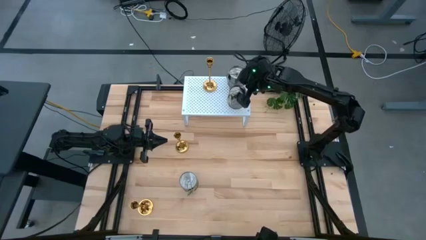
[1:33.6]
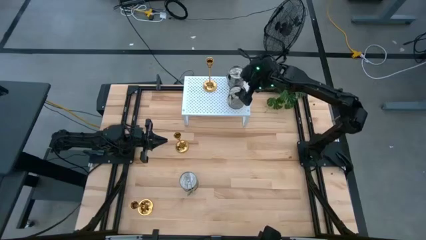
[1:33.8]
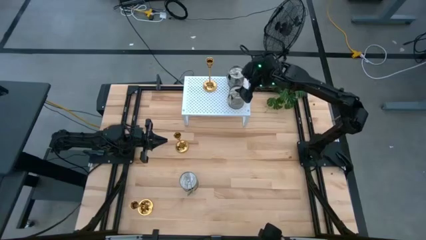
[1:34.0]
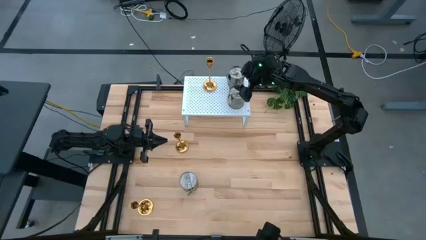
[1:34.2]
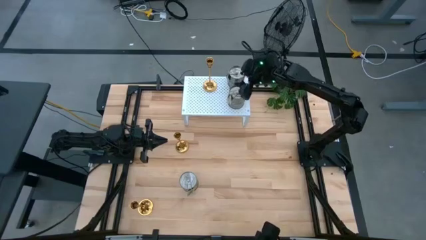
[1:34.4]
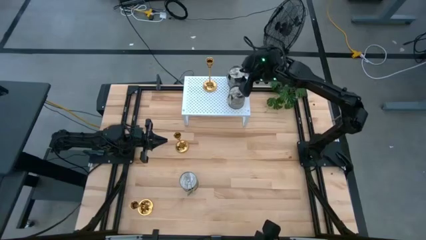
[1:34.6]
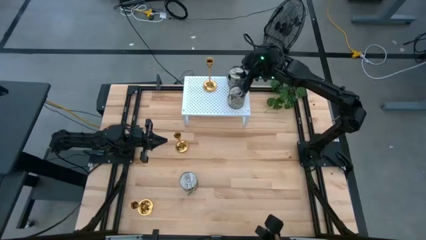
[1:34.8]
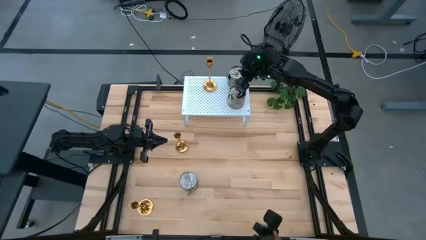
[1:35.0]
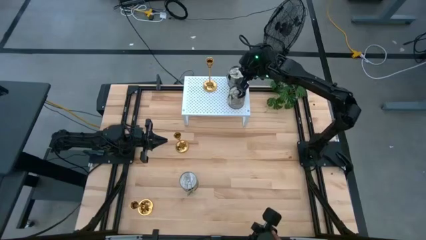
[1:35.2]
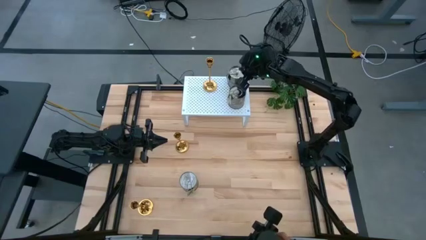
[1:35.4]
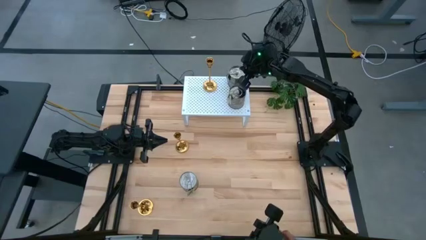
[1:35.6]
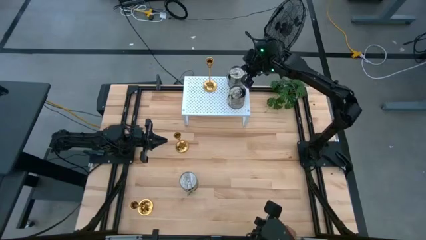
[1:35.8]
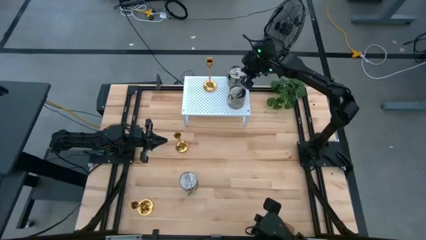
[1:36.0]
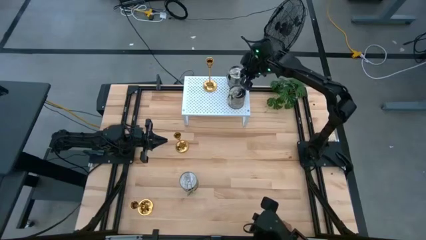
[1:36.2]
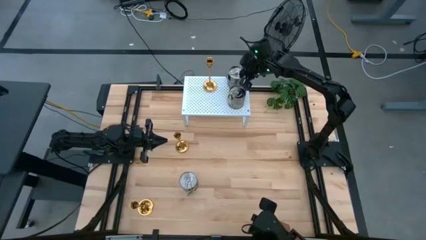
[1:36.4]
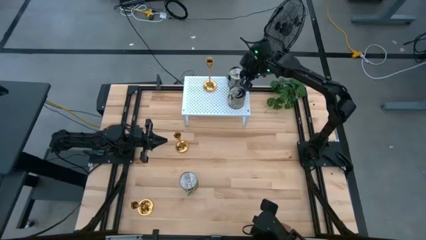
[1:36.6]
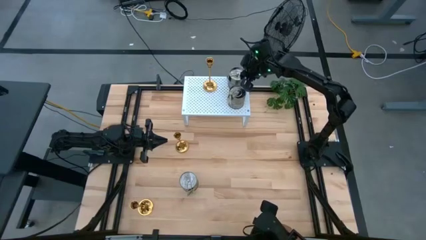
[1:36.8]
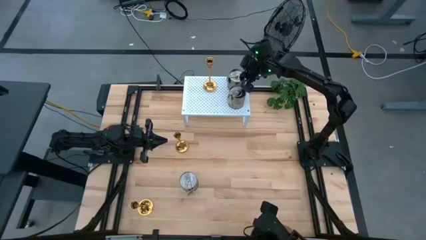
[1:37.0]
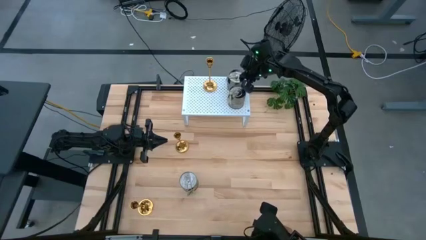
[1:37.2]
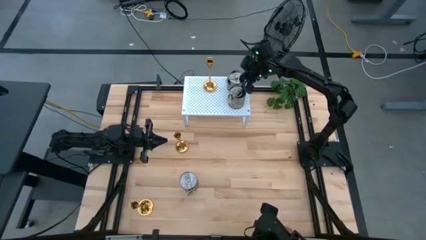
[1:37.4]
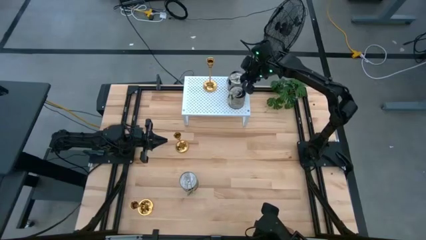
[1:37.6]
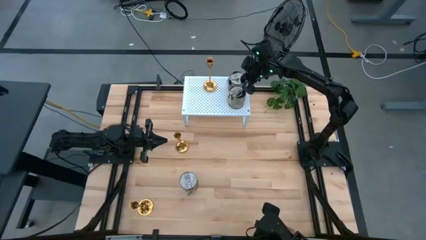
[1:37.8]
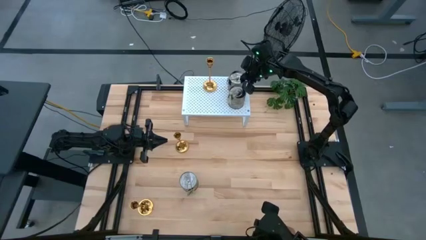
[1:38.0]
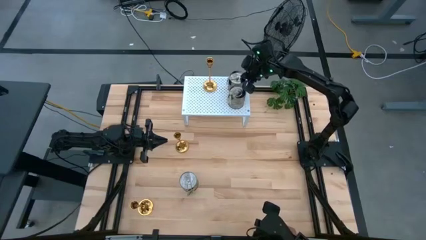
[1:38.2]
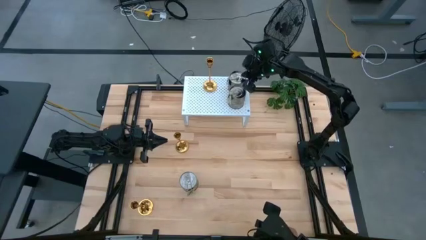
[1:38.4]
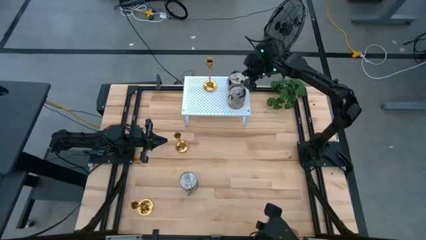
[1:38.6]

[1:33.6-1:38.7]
Task: Pick & Place candle stick holders
Adjust the scented candle can on the shelf

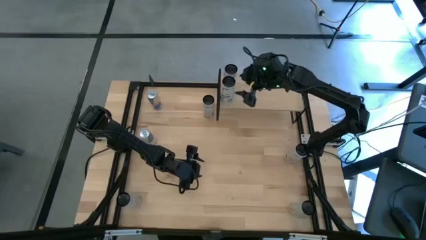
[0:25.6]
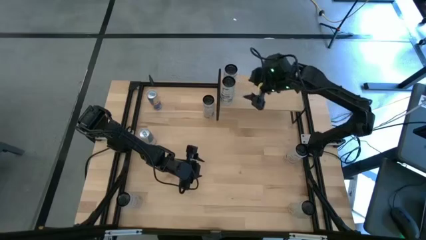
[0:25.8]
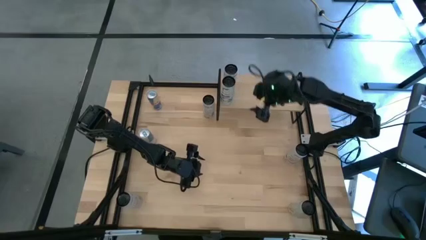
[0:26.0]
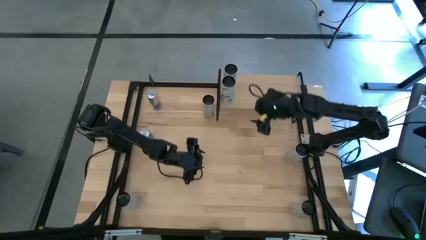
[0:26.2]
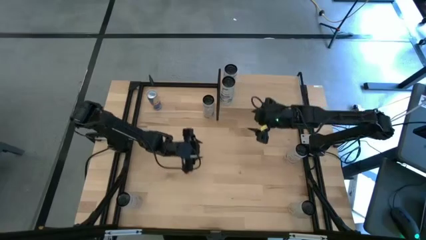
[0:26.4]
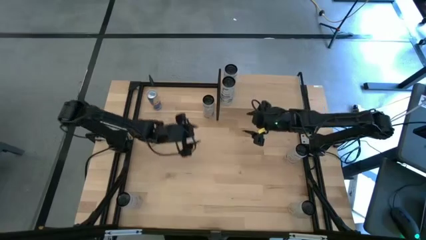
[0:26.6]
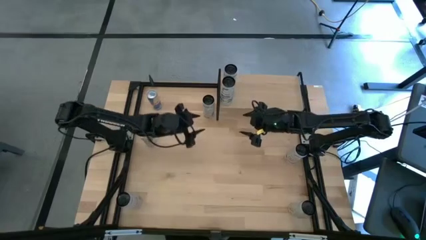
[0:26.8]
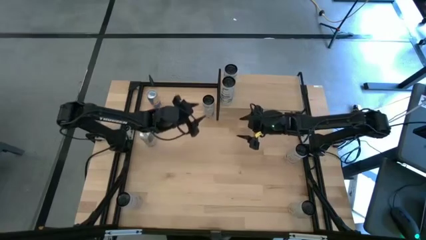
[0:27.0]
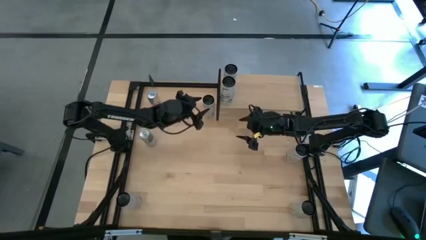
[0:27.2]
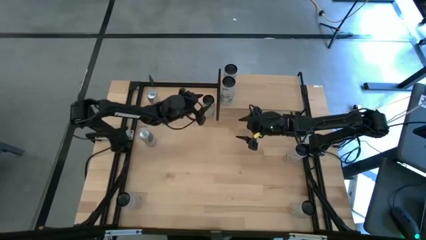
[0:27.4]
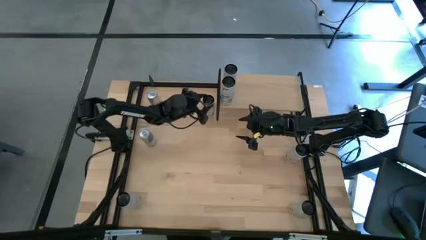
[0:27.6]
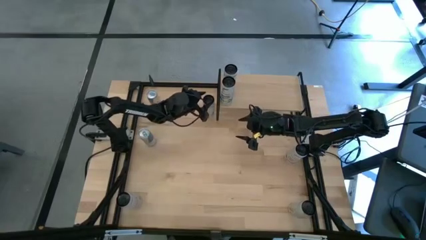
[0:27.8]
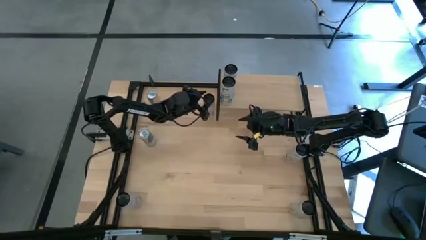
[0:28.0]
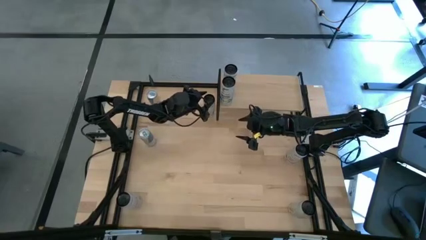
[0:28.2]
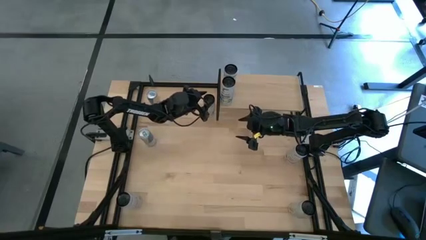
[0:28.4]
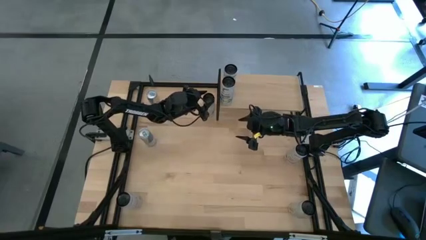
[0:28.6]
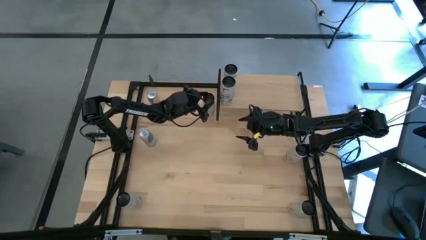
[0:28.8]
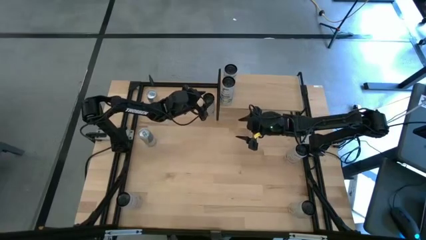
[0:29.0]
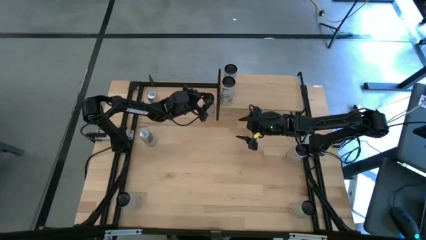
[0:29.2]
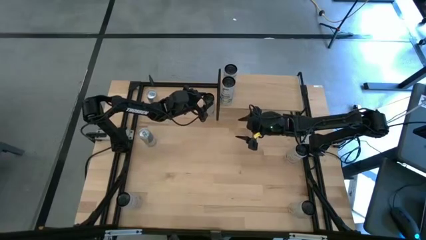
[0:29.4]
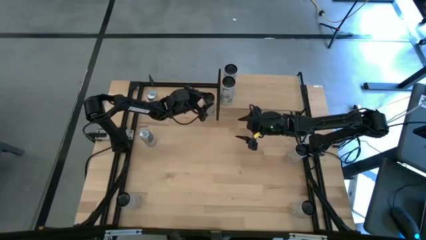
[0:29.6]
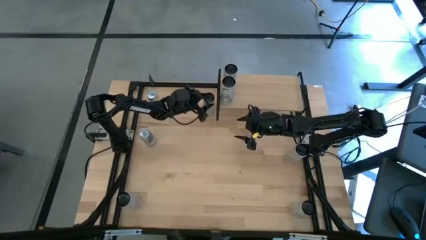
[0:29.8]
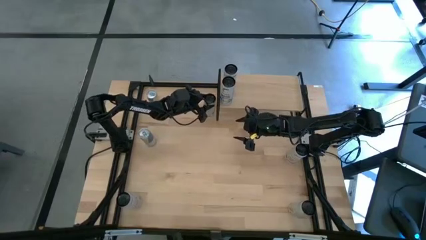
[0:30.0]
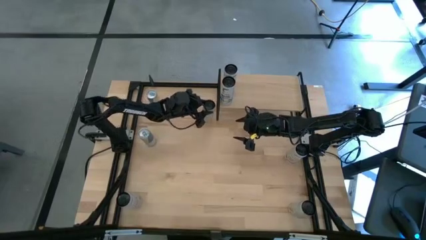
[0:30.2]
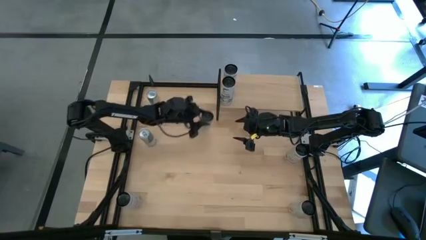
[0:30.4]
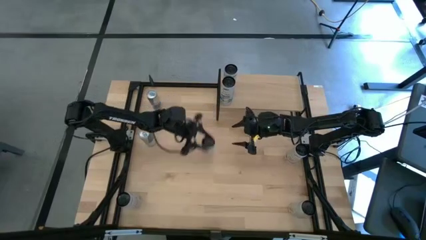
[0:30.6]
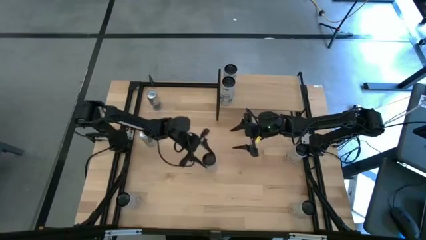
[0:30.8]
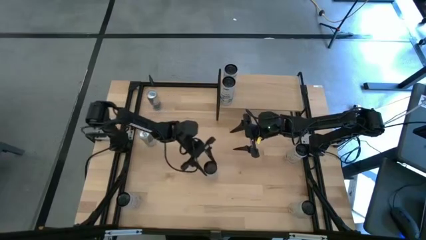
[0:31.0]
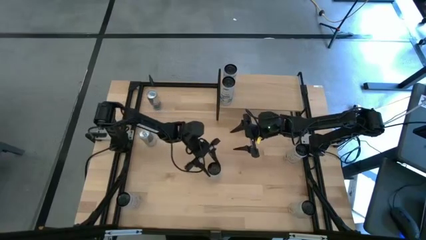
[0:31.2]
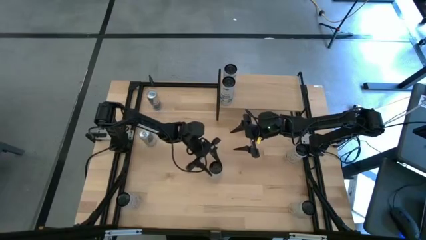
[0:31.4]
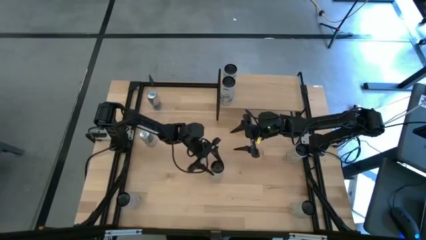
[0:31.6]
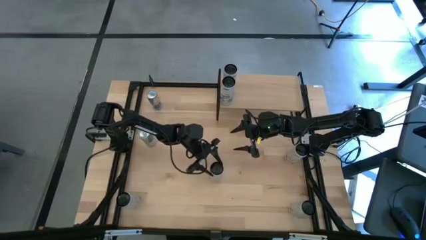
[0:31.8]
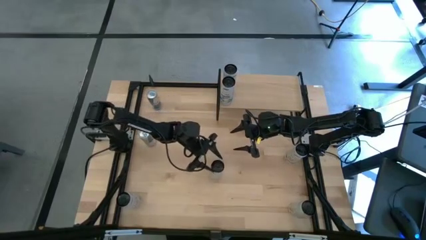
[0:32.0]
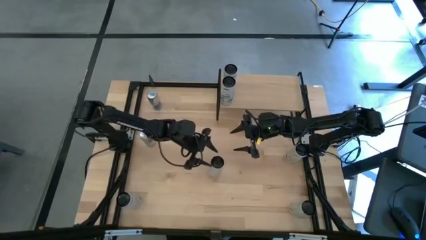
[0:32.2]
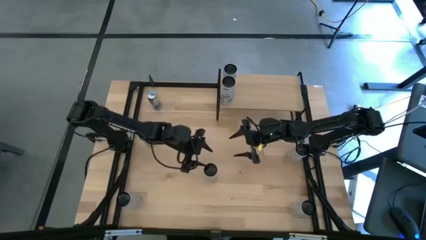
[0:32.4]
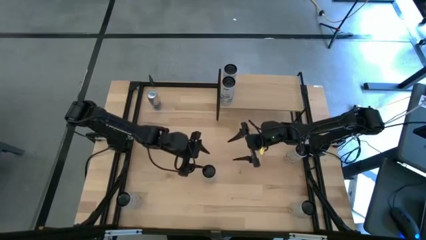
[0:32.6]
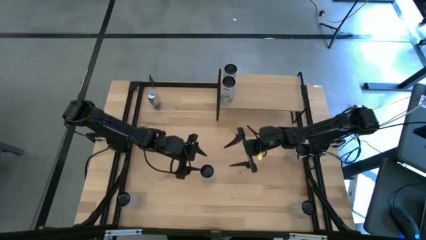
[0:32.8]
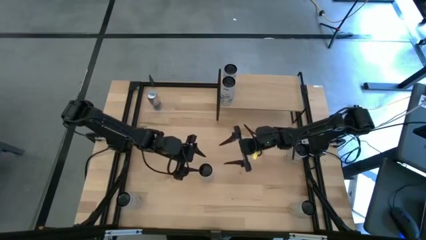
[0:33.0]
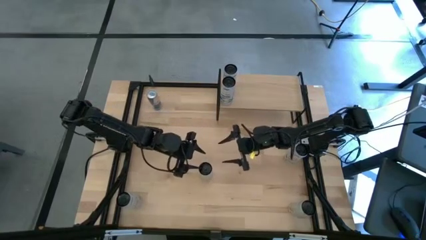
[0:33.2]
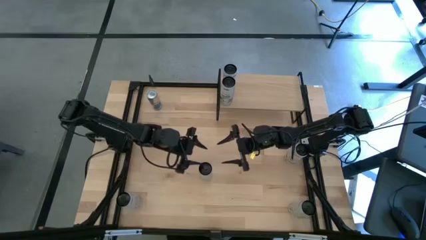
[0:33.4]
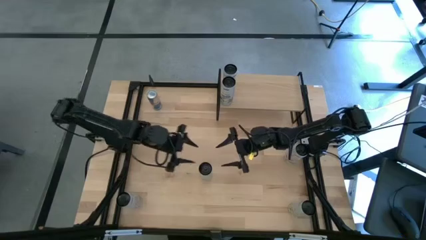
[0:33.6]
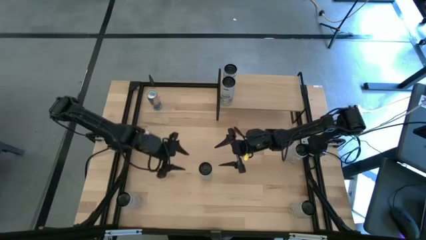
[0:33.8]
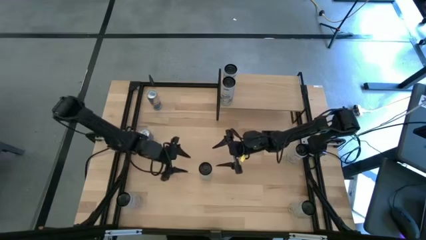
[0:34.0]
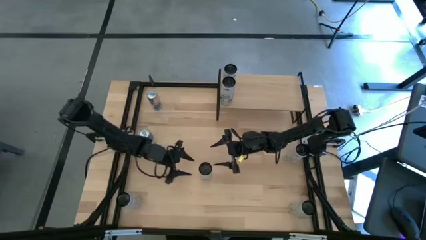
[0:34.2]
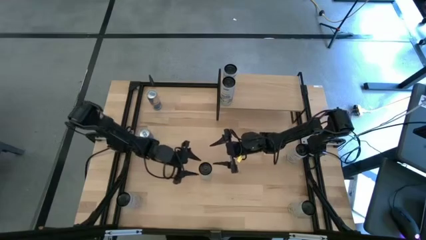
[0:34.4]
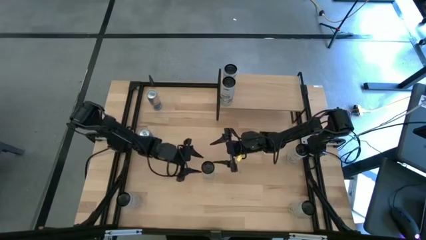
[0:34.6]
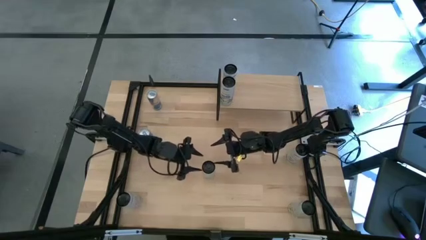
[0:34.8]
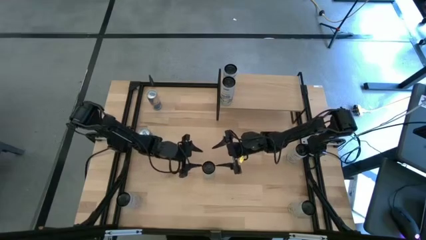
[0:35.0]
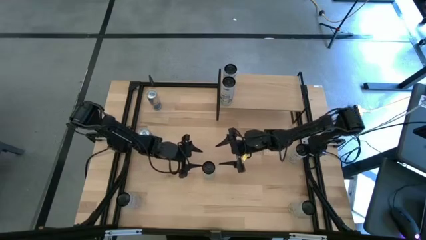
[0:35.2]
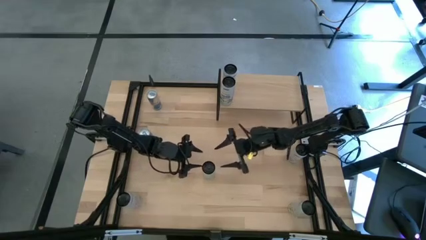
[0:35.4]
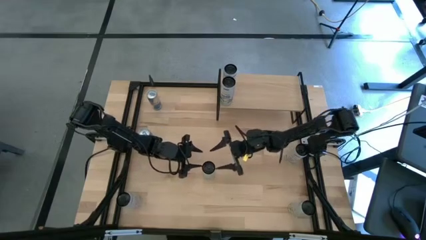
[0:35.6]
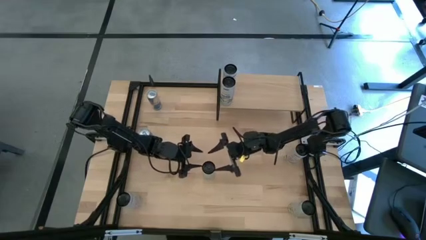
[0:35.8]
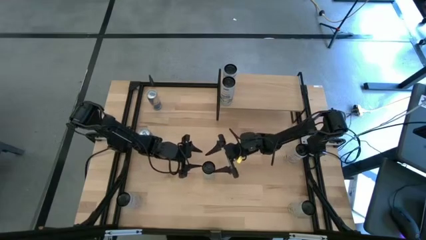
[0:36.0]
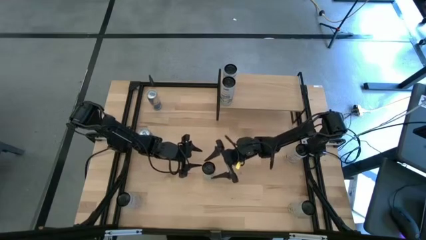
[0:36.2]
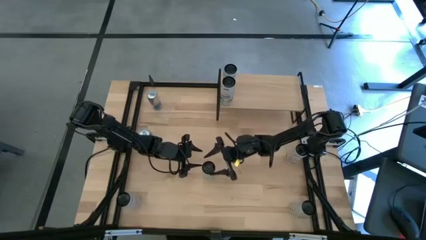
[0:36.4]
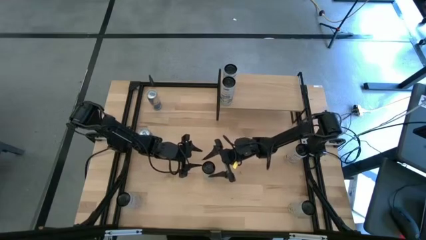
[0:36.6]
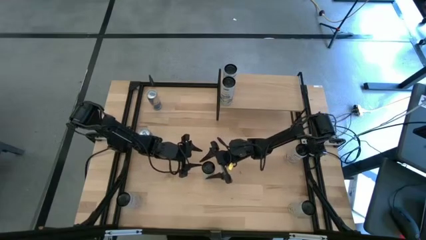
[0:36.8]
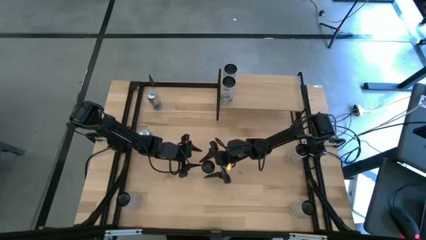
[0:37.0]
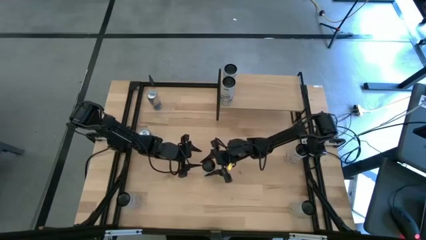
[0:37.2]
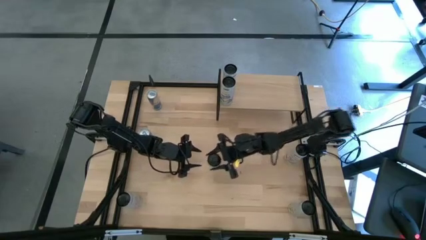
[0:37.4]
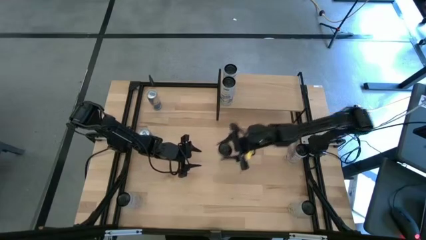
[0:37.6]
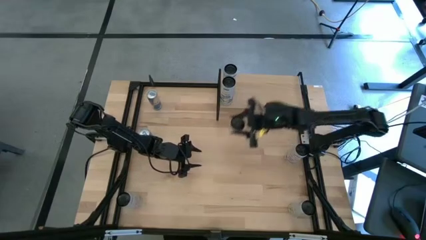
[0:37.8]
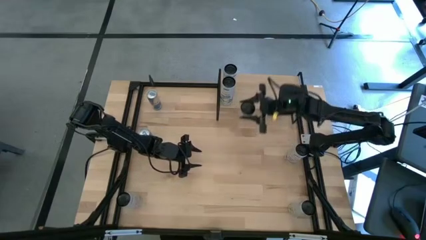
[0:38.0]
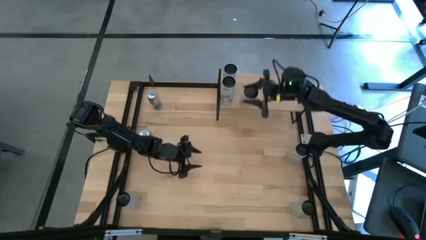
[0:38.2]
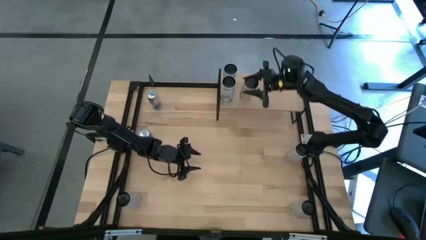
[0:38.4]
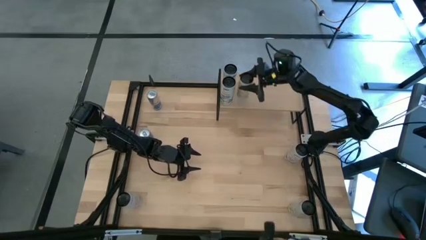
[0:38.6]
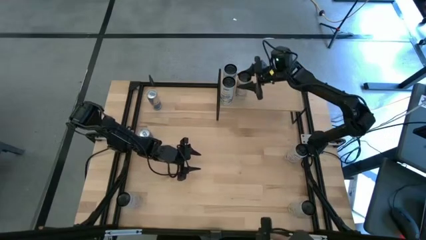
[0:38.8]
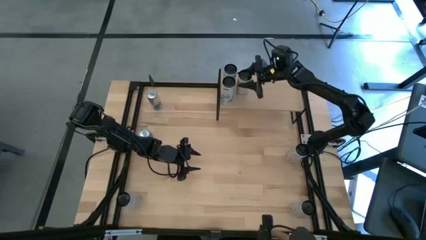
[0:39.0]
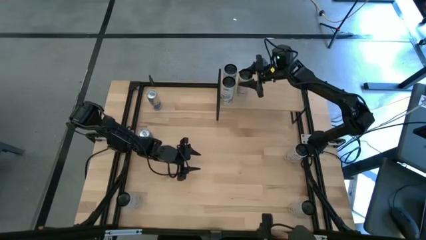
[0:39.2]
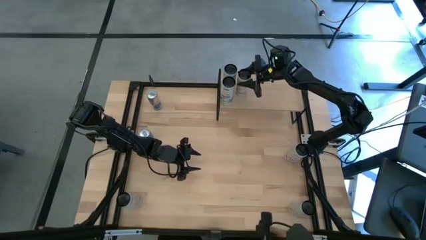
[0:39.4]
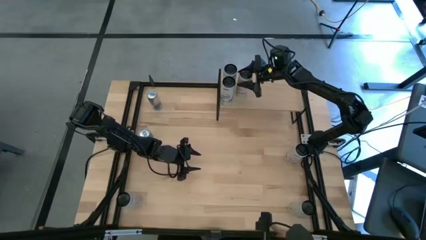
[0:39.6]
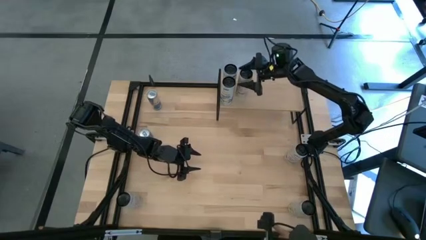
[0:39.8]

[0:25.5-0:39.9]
Task: Place canned beverage on shelf
Put the top white yellow soda can on the shelf
